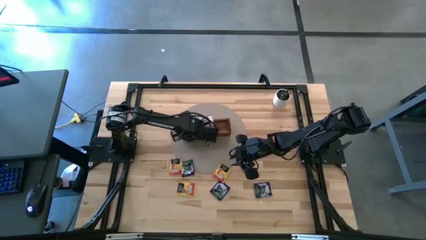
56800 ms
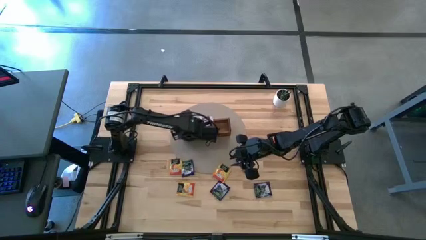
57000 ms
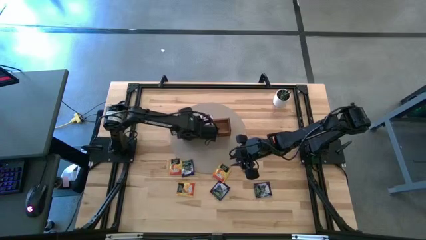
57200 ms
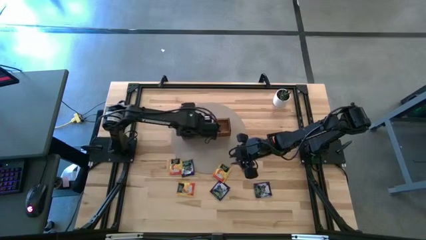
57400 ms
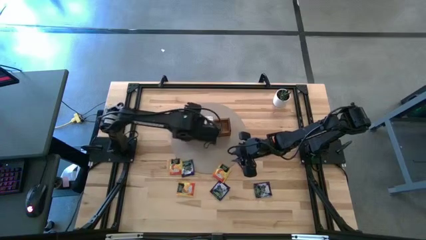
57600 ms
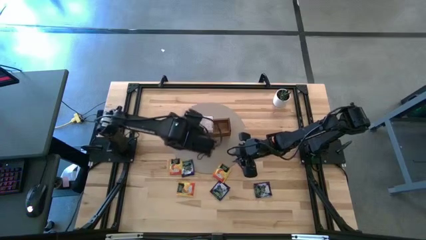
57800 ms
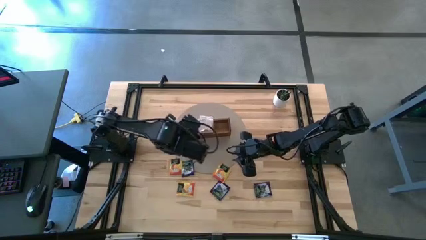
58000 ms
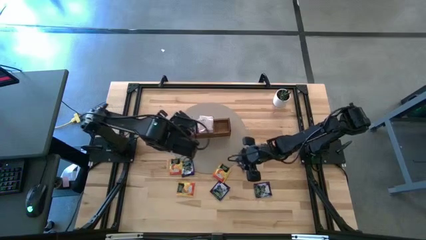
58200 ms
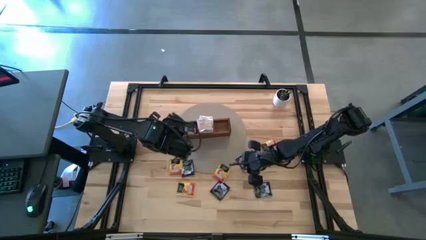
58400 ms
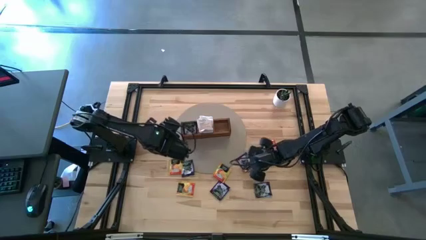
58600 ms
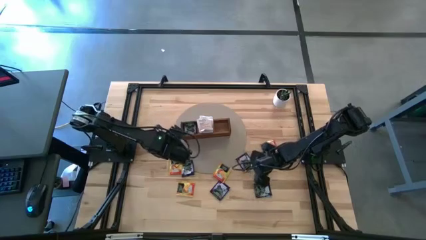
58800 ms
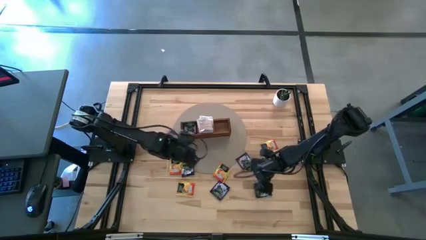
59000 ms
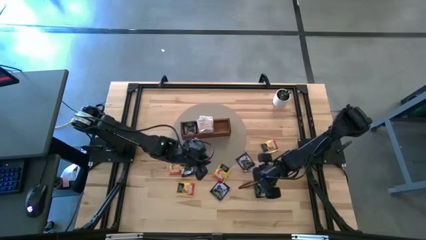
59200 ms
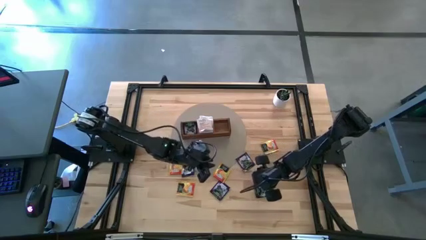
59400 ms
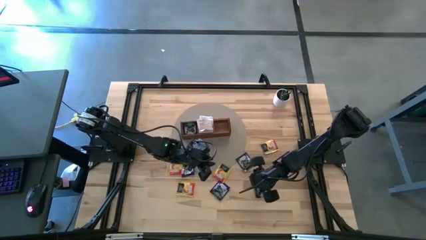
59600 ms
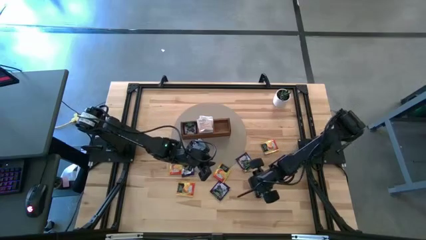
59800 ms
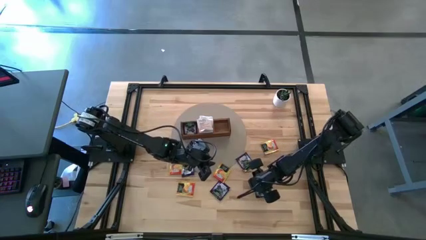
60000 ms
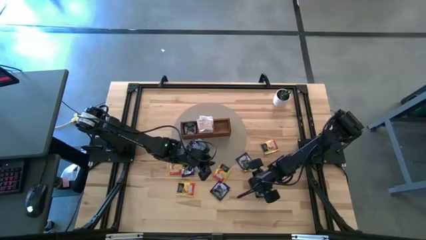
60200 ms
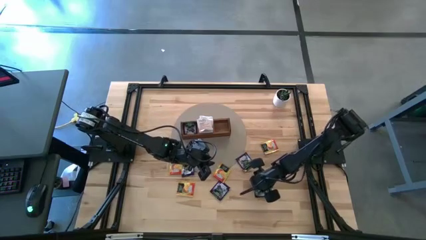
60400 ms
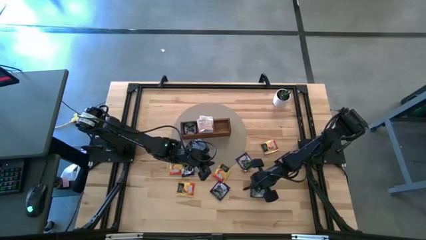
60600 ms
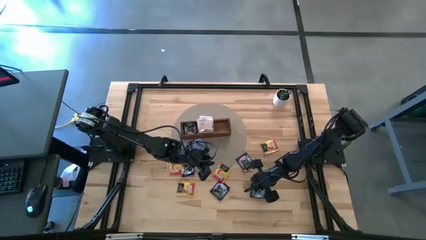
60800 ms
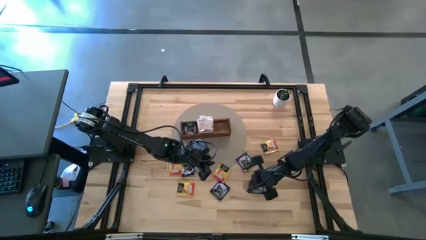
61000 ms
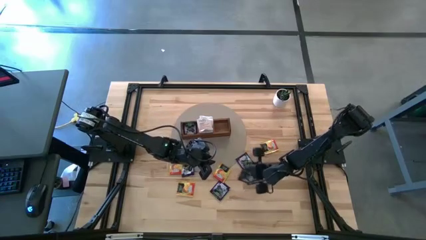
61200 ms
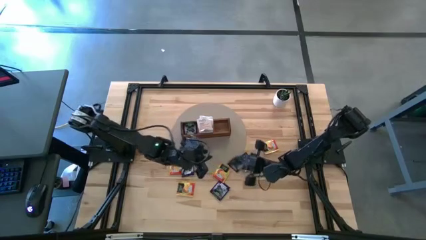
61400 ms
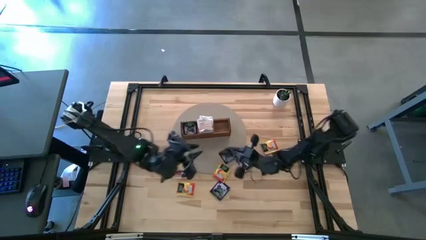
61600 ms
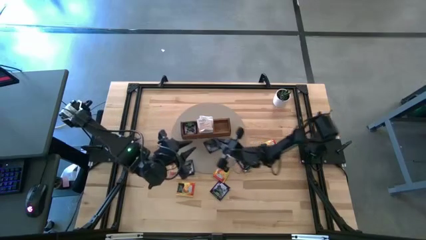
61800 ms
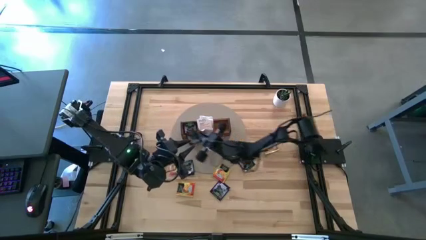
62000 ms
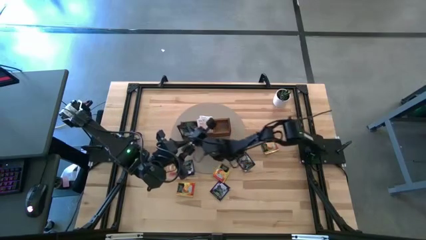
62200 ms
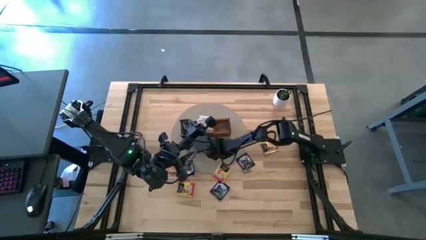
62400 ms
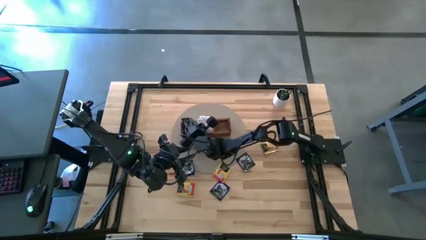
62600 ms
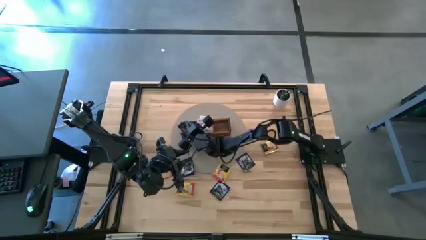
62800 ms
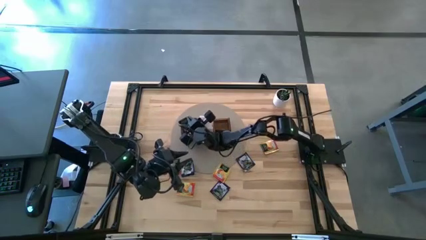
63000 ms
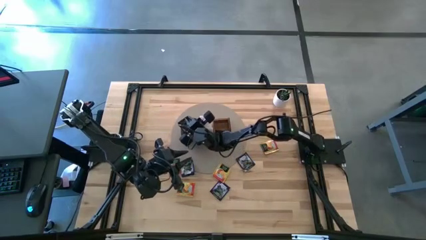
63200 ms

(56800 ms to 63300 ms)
Task: Pick & Place Tea
Put the purple tea bag into the left section of the wooden organizer

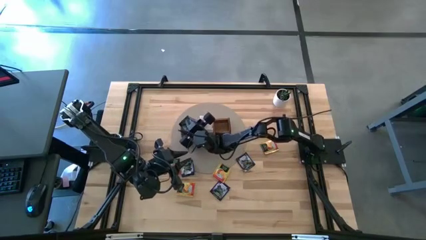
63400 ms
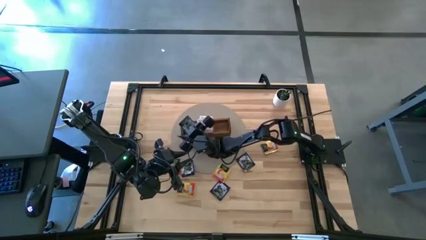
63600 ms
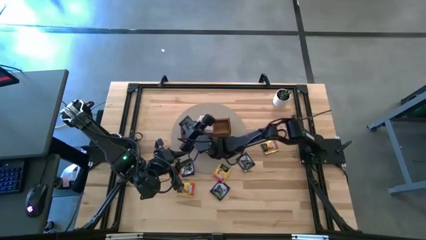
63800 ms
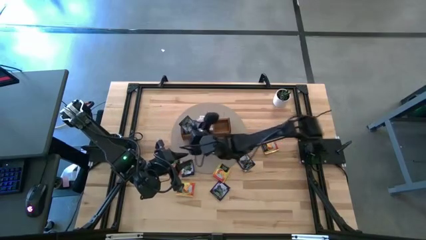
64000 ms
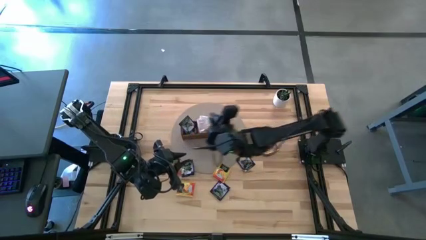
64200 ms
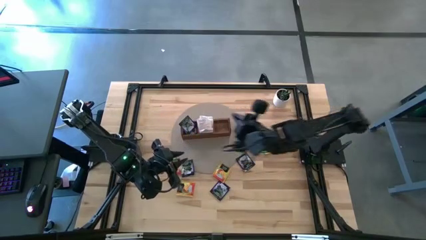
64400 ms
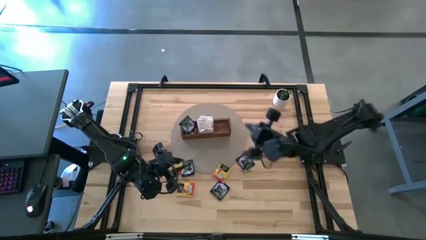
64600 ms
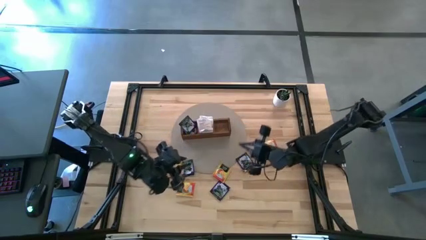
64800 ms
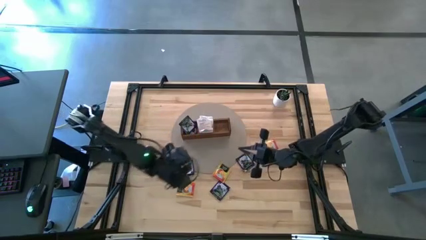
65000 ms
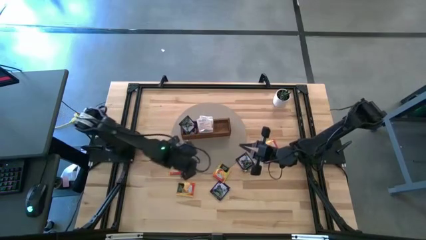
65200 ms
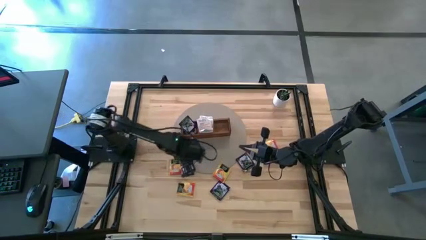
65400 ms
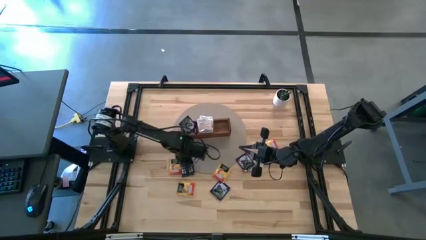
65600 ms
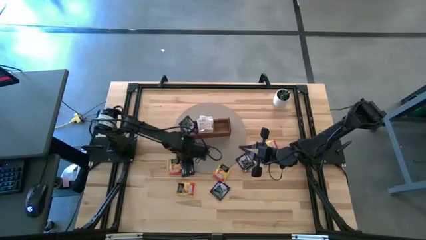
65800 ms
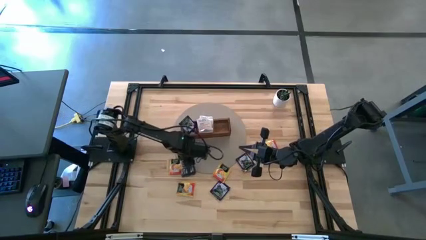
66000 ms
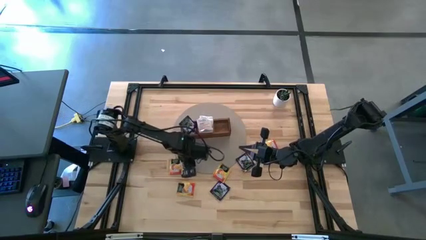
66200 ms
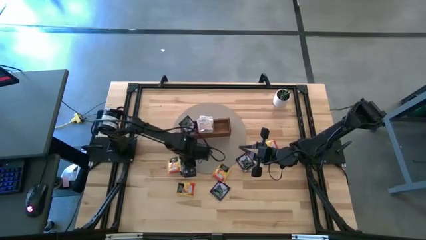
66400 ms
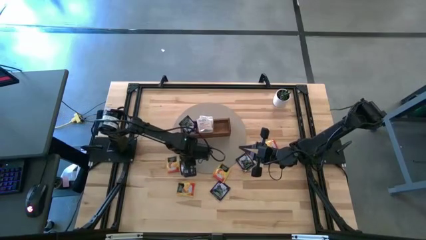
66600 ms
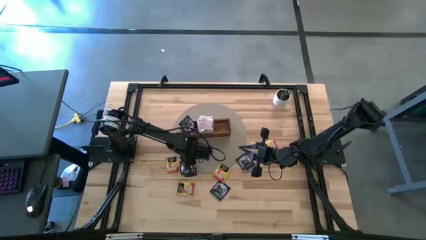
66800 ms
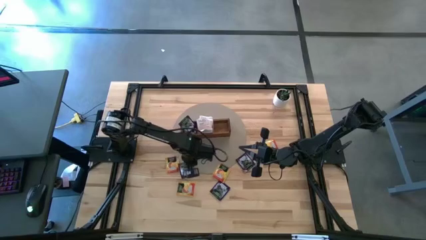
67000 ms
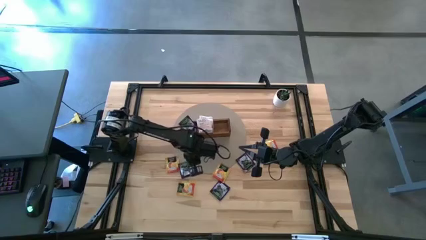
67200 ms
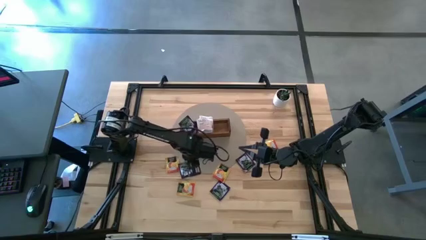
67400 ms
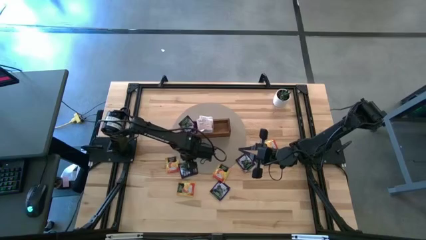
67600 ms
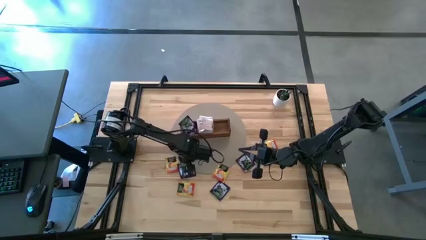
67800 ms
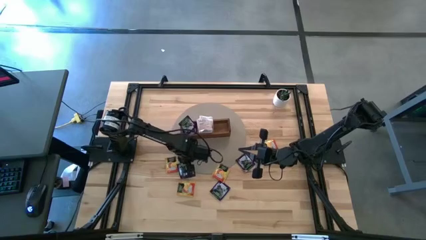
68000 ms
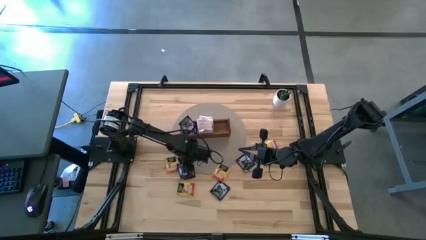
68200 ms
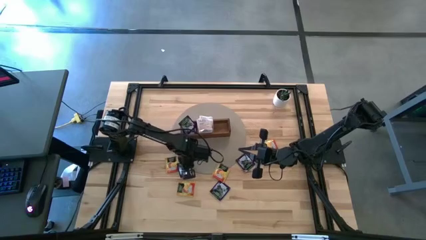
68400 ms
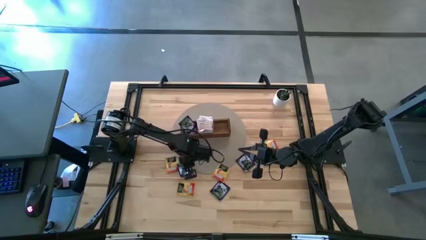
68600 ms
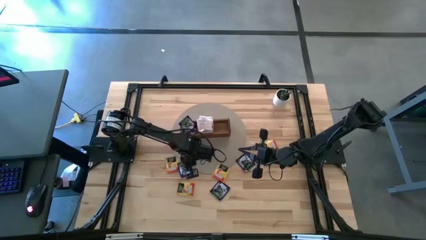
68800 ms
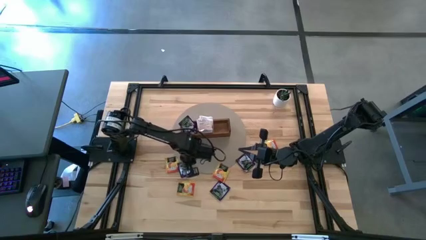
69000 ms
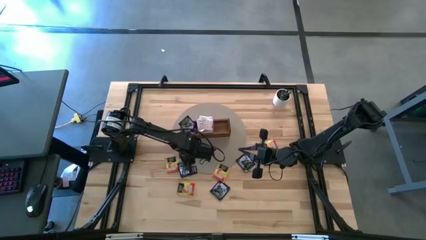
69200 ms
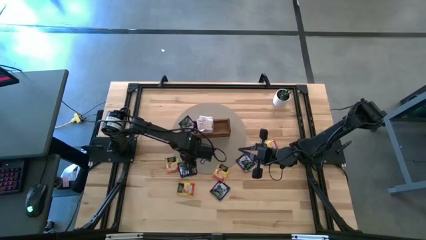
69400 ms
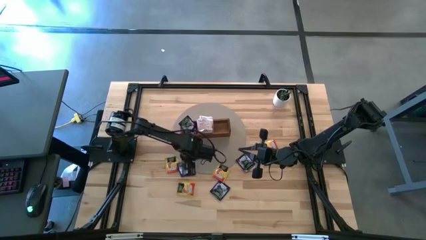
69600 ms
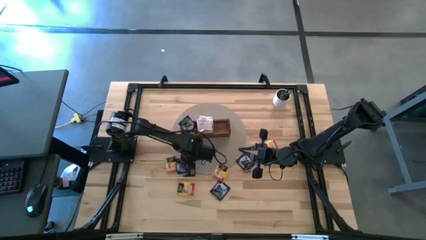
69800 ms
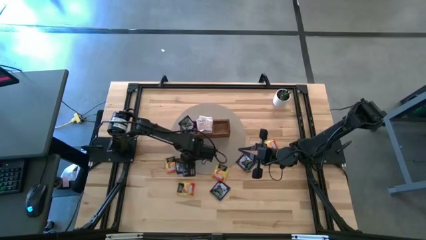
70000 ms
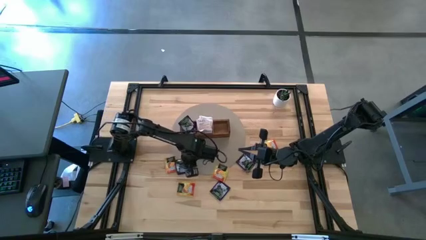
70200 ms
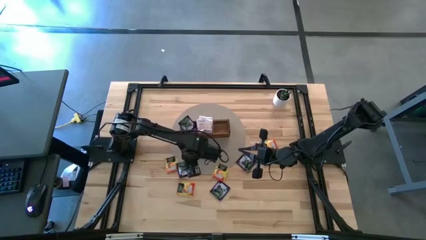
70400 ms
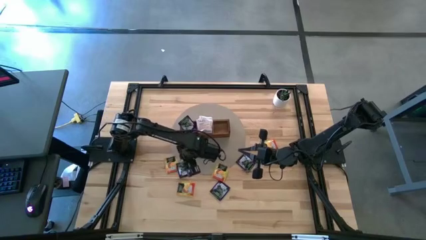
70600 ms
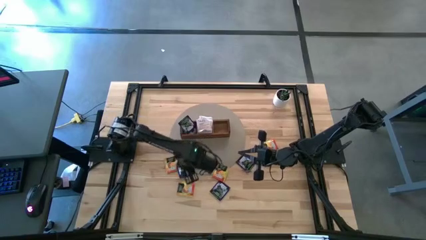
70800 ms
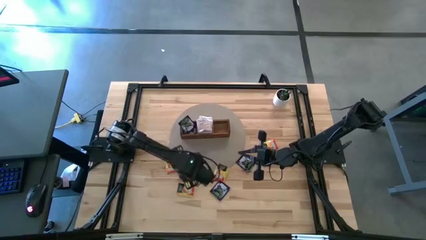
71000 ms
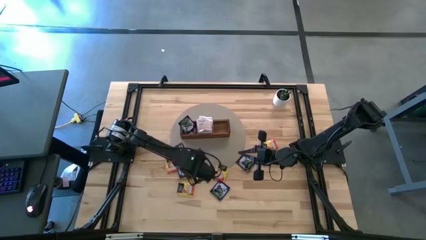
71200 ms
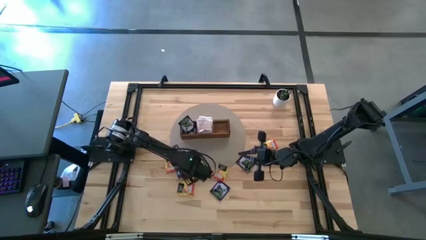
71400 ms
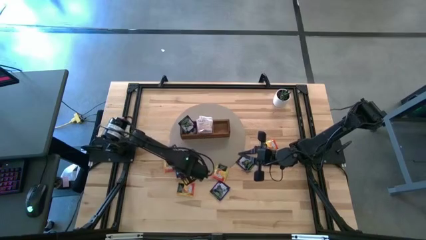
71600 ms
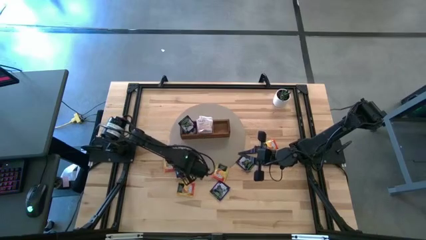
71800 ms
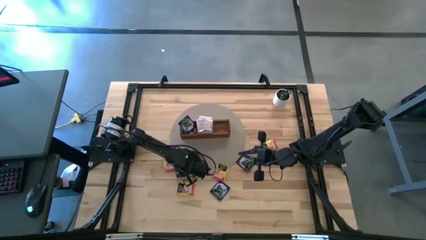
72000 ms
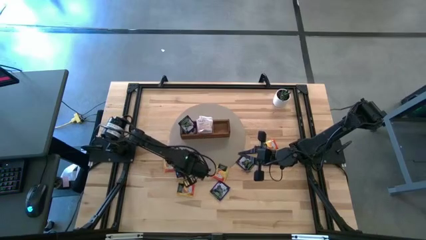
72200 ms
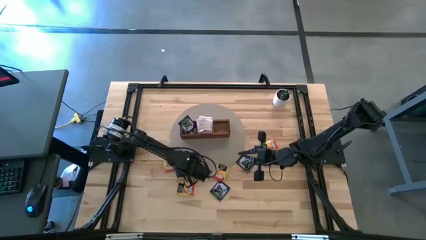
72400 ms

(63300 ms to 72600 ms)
Put the purple tea bag into the left section of the wooden organizer
